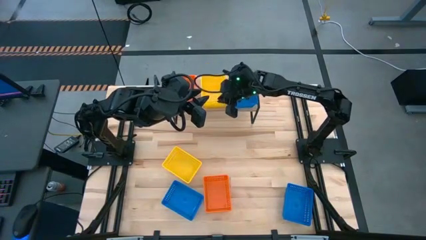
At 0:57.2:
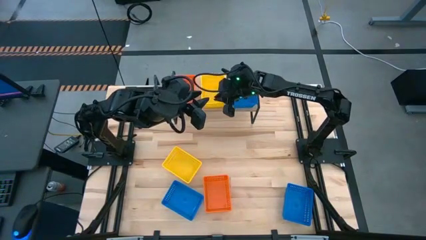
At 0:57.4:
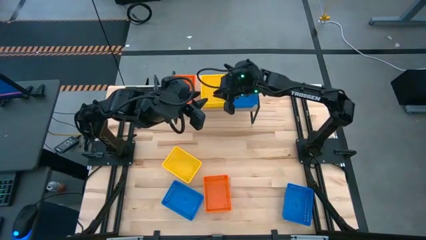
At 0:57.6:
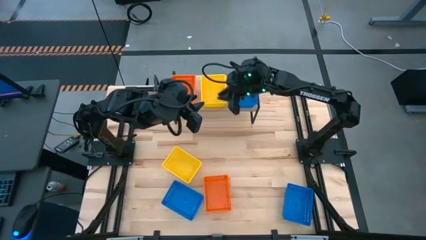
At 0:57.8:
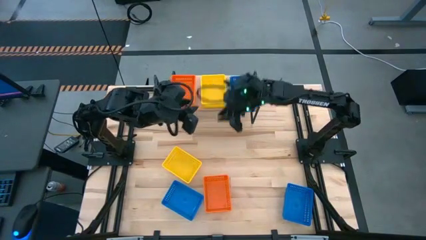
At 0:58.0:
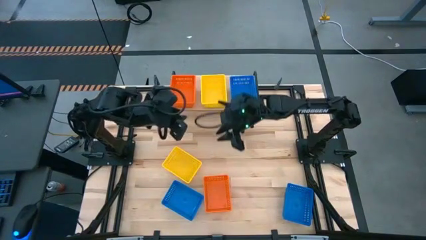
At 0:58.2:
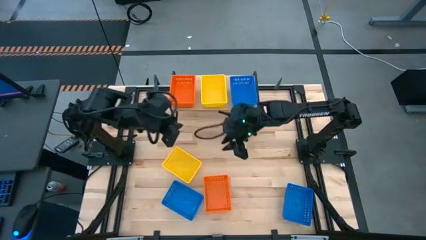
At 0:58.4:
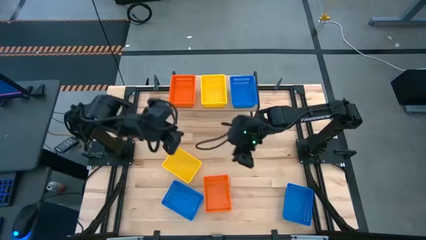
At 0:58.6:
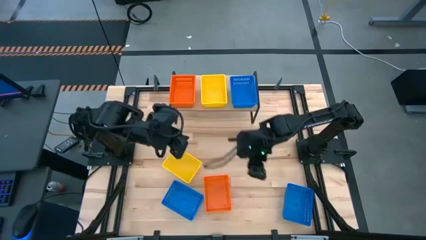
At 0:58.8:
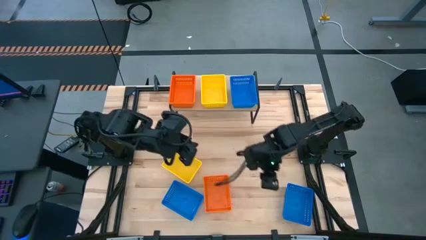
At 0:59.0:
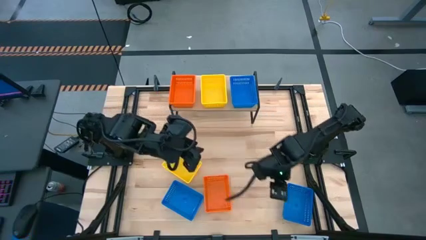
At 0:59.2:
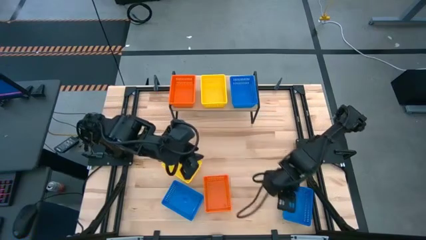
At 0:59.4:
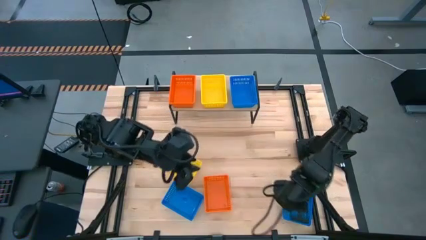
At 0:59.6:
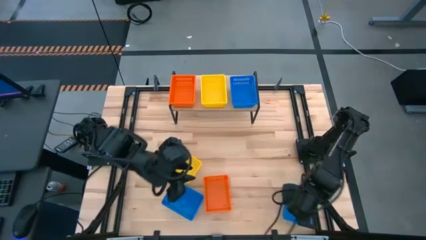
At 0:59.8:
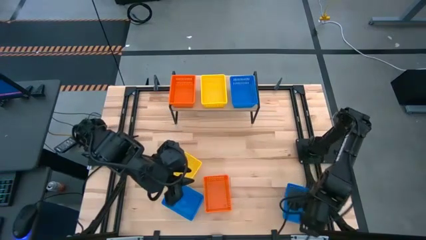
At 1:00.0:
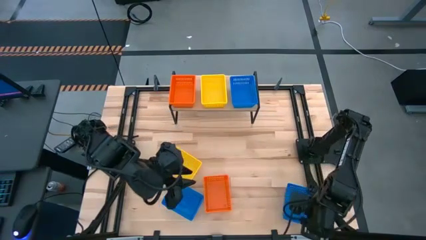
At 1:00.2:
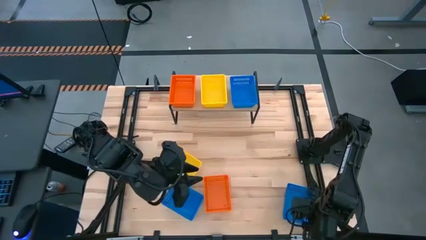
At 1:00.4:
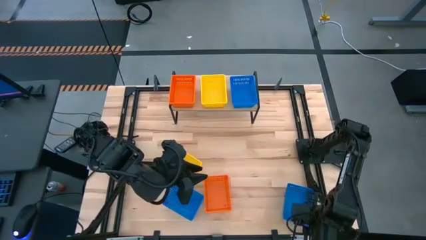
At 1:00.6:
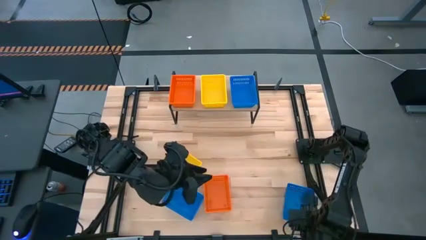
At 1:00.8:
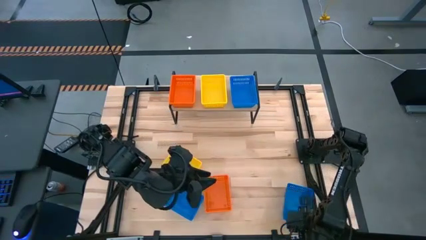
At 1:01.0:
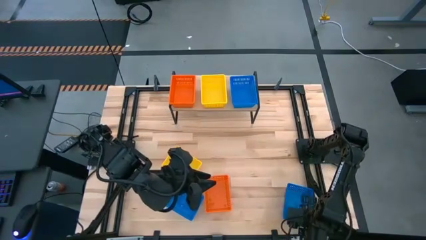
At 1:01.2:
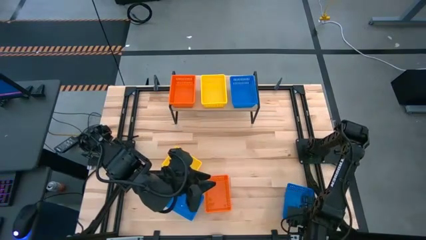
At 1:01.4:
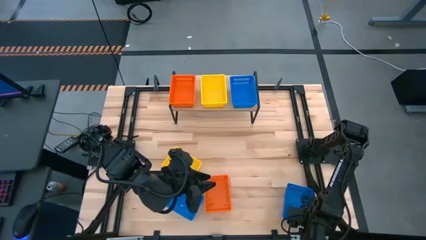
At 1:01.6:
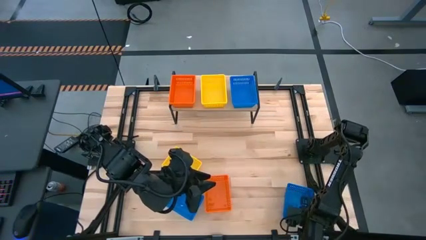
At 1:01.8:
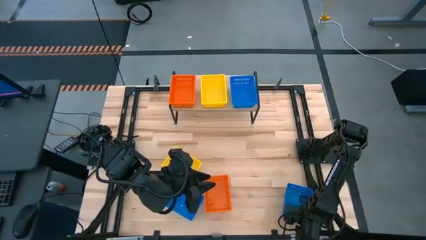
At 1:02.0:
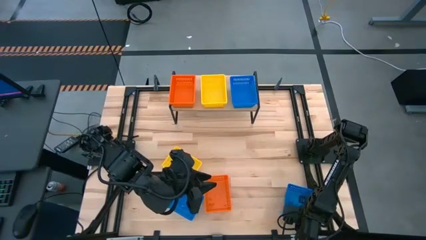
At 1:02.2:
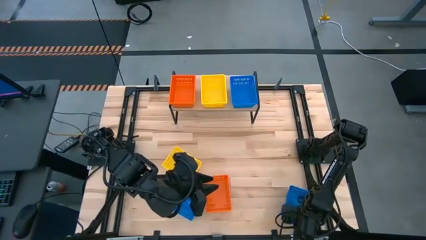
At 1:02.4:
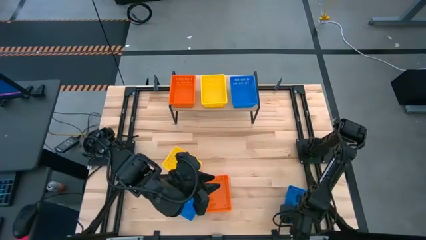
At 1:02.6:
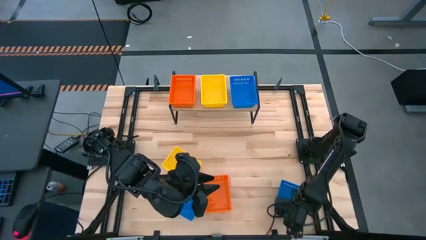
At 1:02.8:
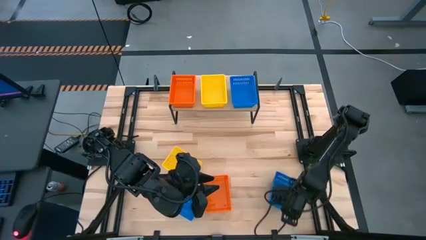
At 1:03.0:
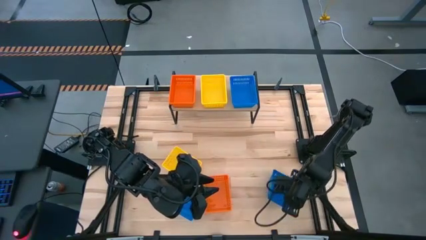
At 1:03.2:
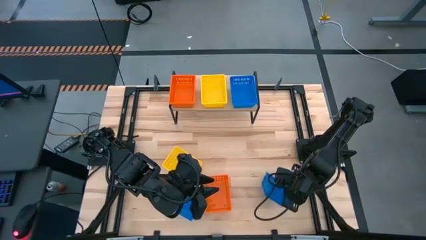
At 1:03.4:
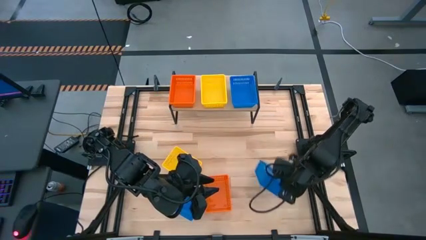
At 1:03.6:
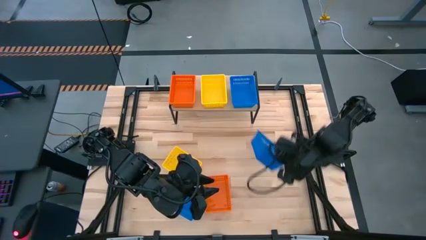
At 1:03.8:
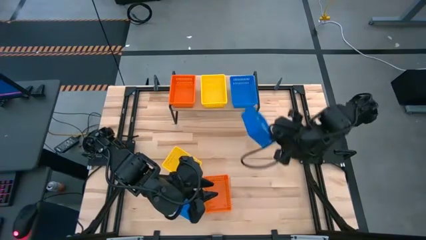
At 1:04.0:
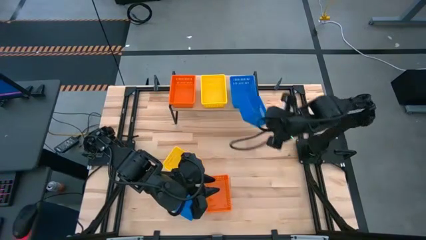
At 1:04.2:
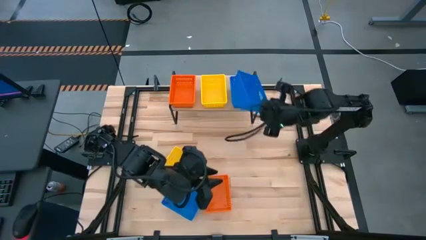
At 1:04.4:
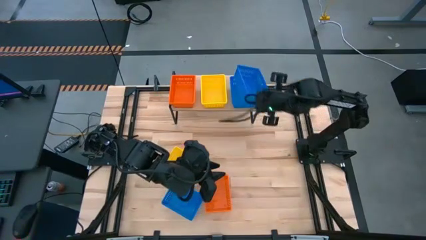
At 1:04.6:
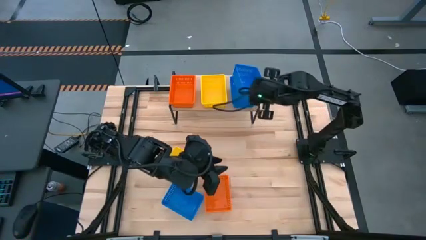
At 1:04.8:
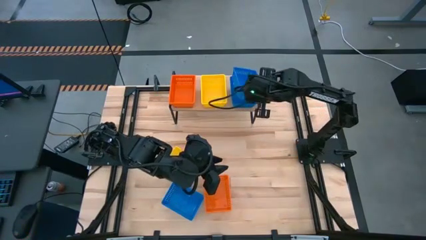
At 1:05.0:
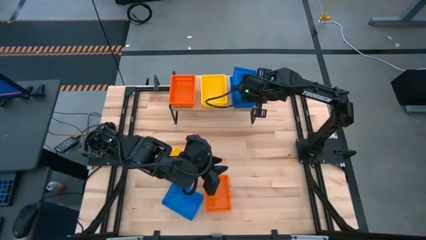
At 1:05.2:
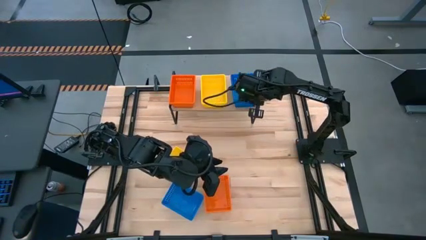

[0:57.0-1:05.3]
Task: Stack baskets on shelf by color
Stack the right blue bin on top of the blue bin on the shelf

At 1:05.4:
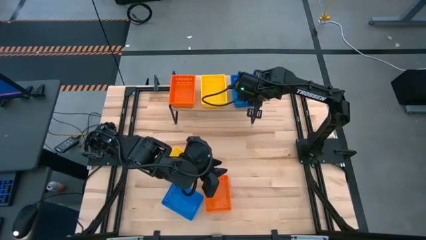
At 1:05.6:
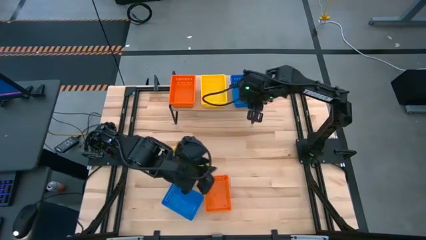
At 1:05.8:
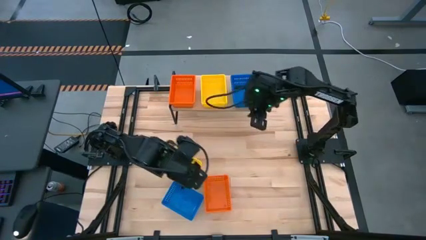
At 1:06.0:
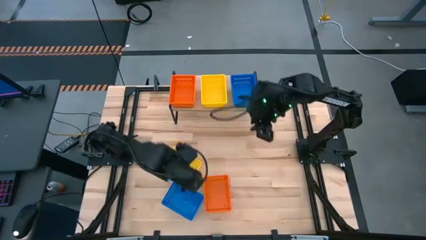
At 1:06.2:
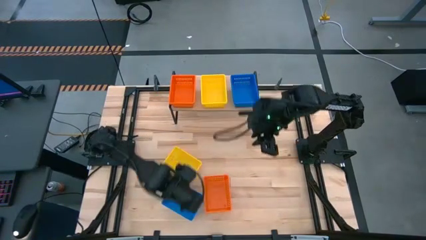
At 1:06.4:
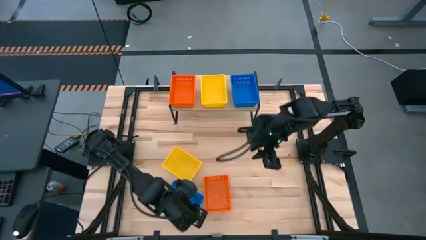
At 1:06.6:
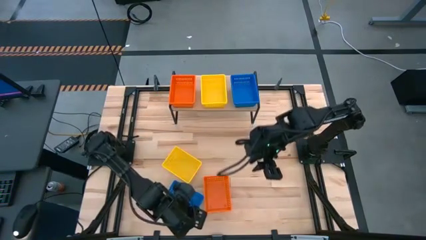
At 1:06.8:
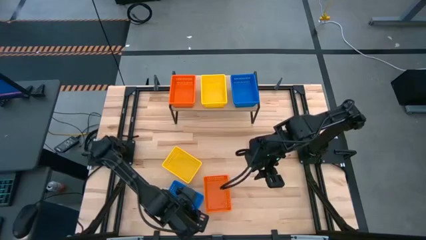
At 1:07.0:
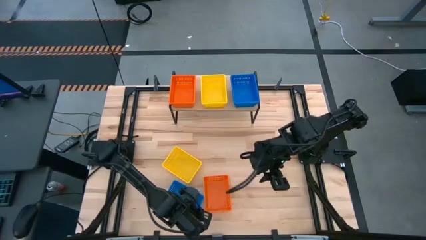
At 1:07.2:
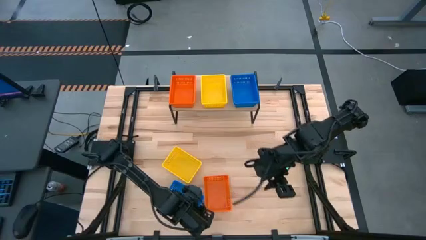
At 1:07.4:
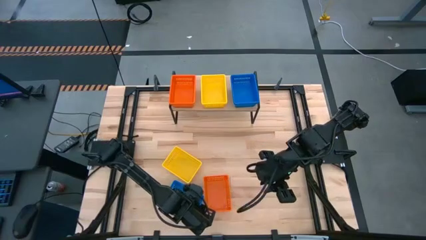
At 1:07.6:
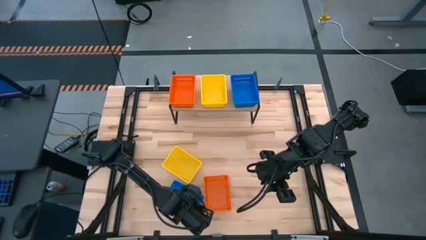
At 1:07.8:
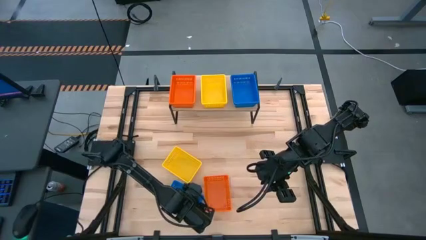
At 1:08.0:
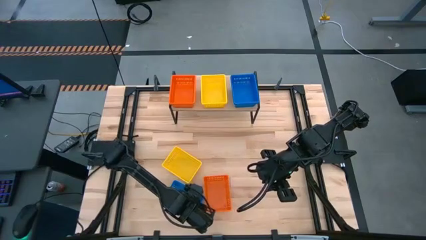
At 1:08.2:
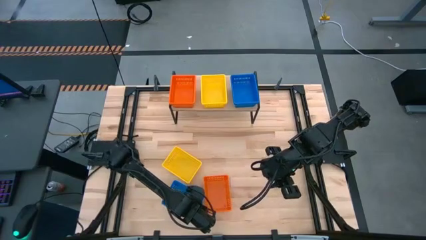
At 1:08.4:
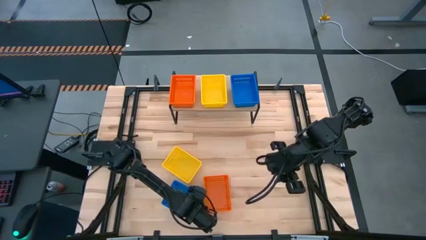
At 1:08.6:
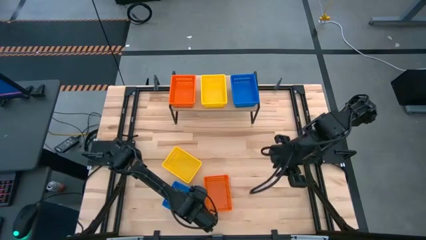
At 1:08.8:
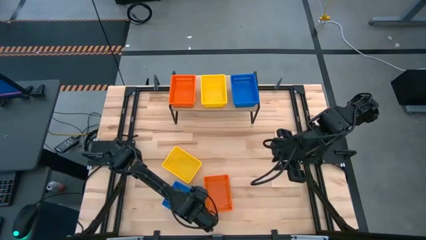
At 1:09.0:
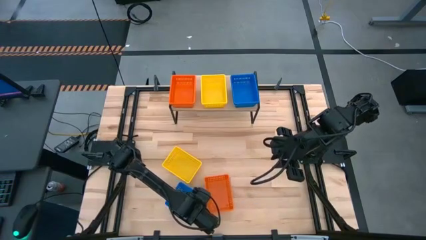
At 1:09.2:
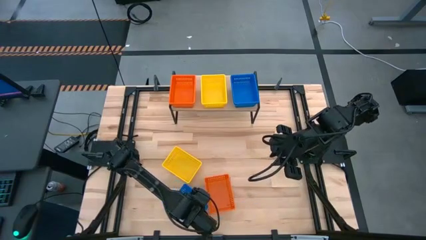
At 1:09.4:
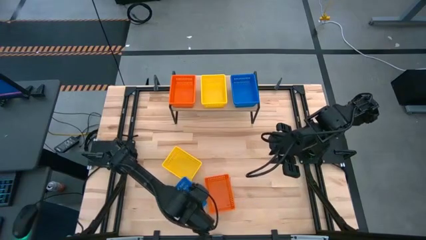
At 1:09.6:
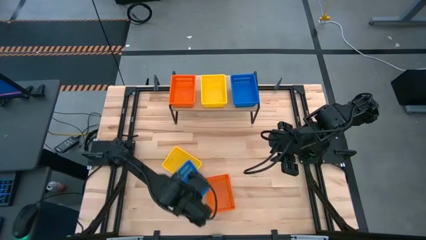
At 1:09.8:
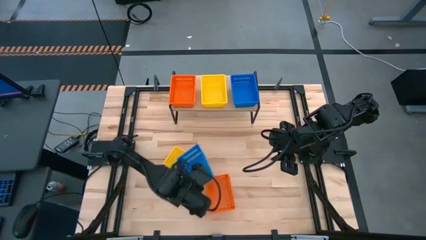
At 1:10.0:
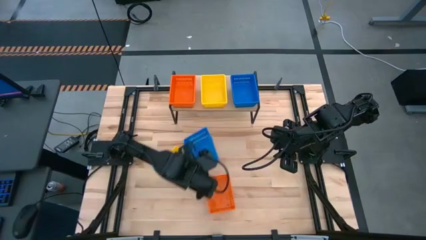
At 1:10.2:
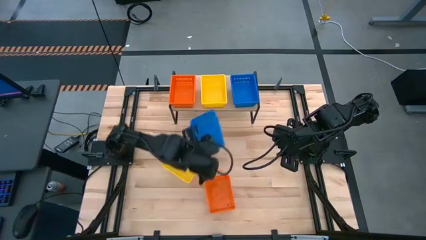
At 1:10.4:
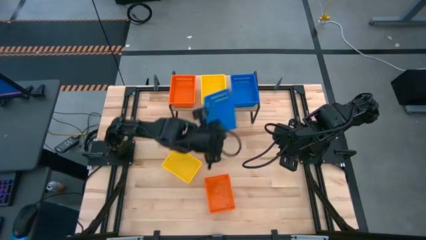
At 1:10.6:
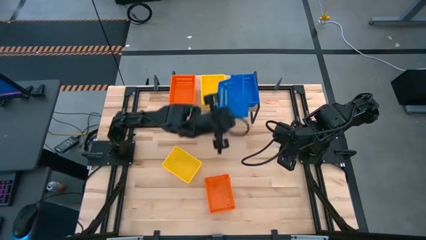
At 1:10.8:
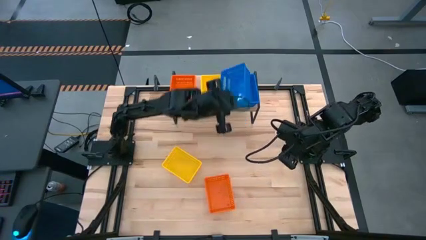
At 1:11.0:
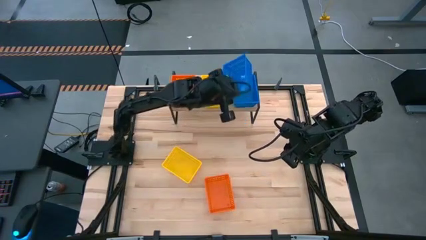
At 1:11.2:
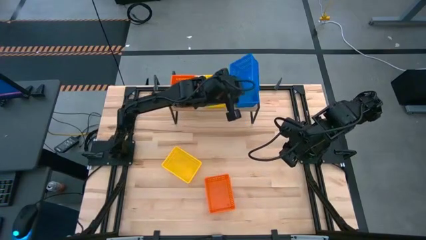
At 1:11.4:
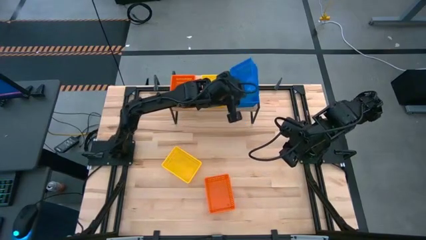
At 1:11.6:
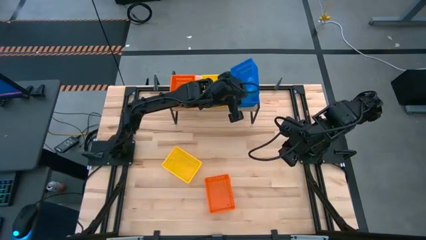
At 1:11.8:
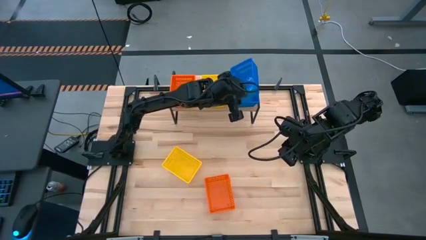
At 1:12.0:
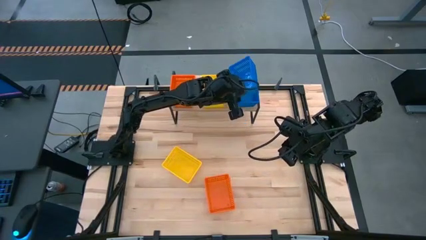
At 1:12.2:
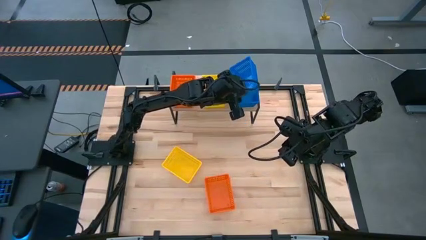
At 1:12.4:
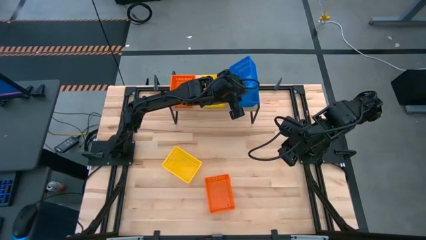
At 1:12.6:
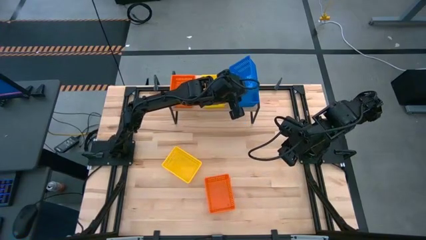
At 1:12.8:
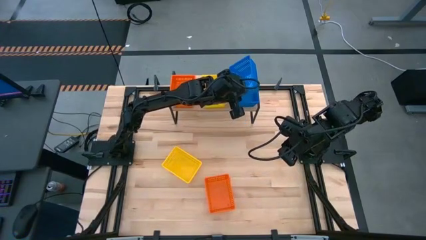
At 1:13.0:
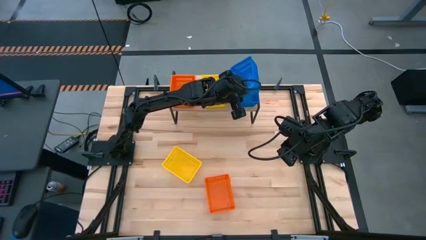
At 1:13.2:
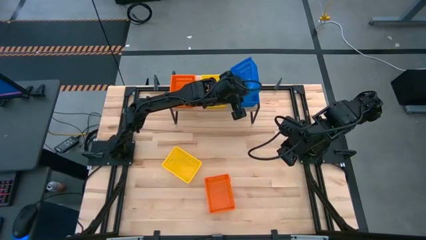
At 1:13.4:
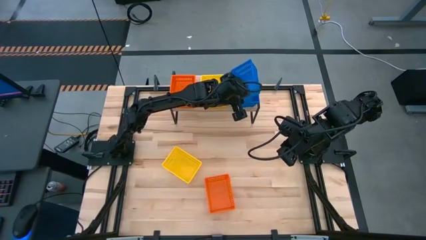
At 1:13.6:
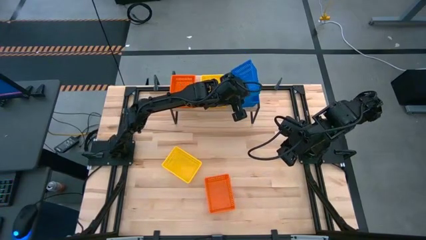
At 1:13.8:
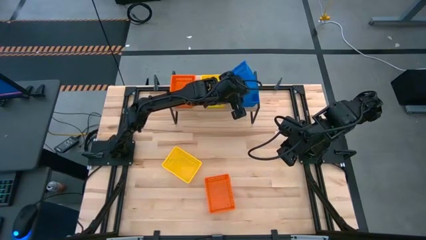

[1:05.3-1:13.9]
Stack the blue bin on top of the stacked blue bins on the shelf
